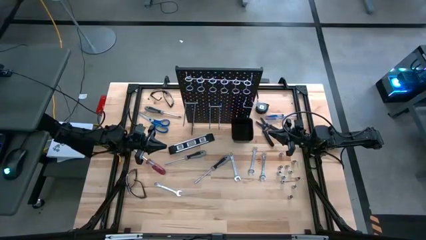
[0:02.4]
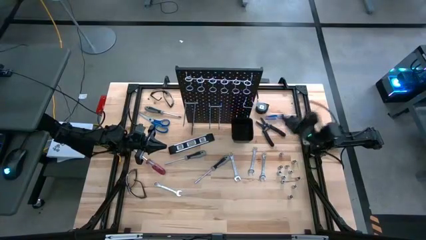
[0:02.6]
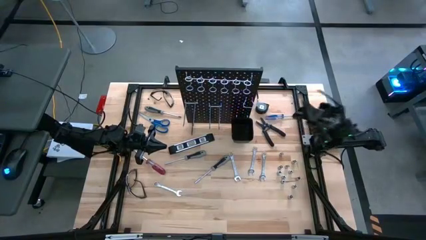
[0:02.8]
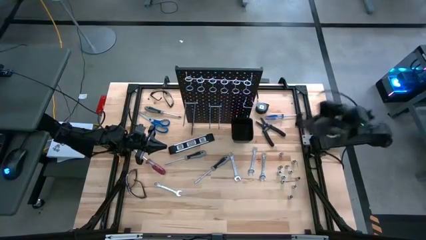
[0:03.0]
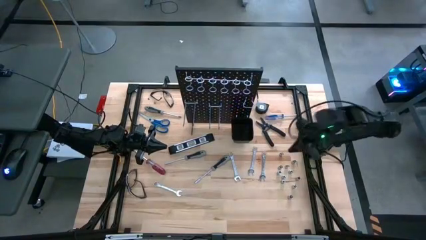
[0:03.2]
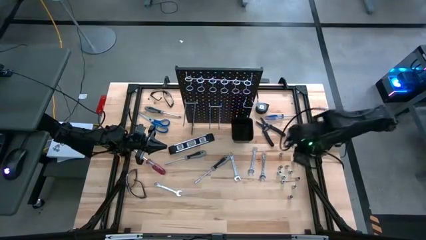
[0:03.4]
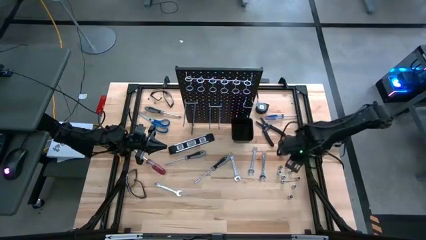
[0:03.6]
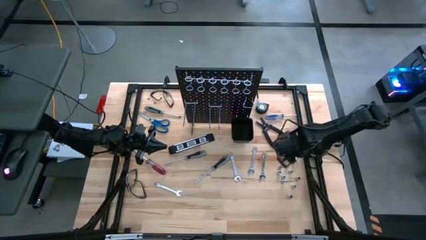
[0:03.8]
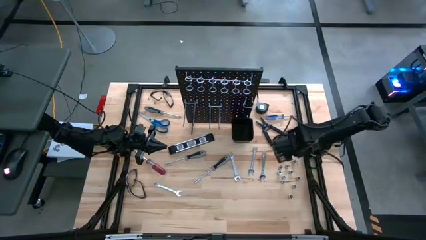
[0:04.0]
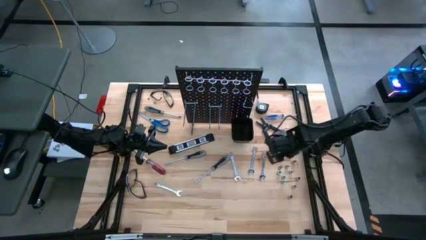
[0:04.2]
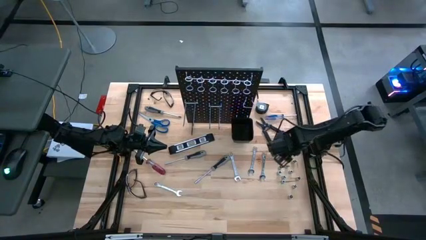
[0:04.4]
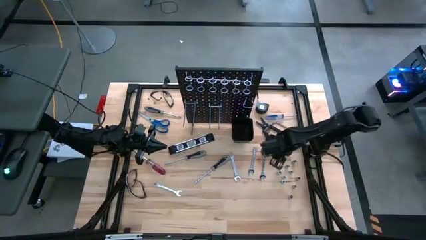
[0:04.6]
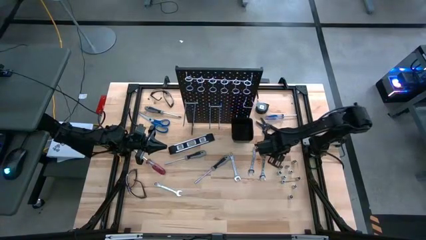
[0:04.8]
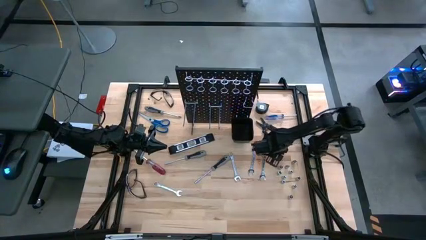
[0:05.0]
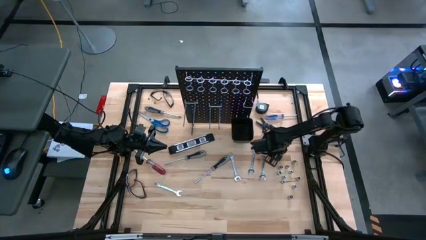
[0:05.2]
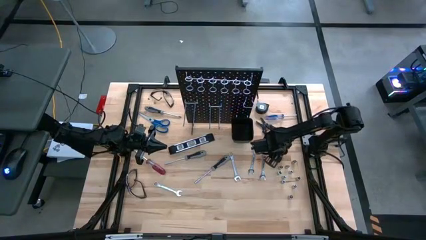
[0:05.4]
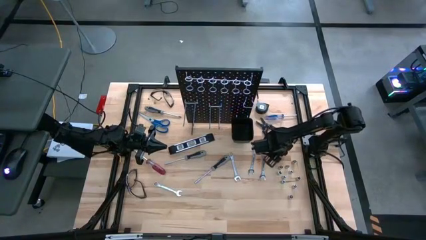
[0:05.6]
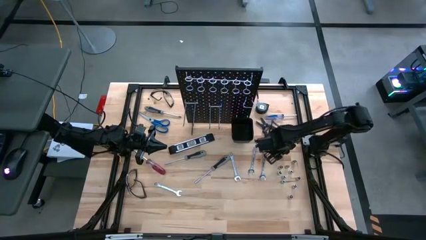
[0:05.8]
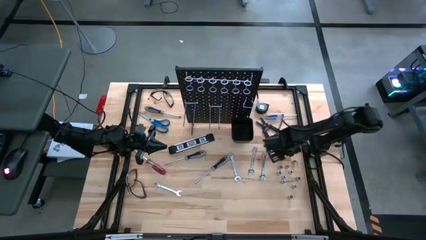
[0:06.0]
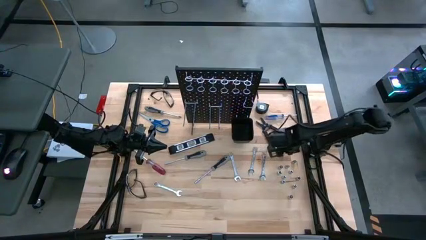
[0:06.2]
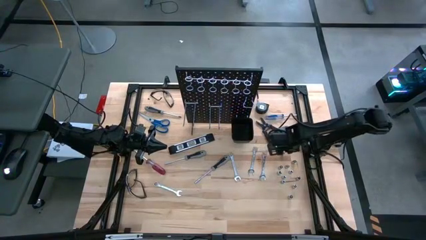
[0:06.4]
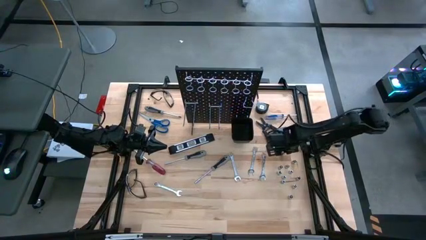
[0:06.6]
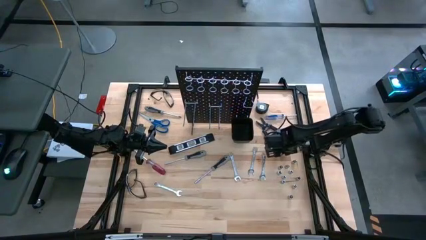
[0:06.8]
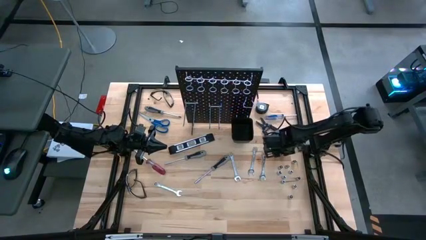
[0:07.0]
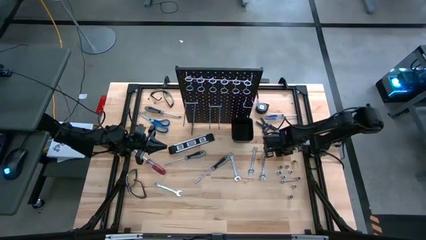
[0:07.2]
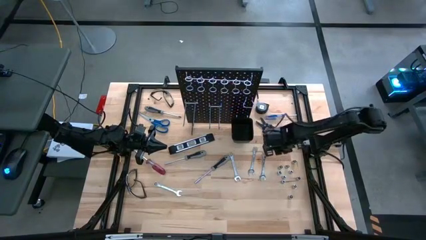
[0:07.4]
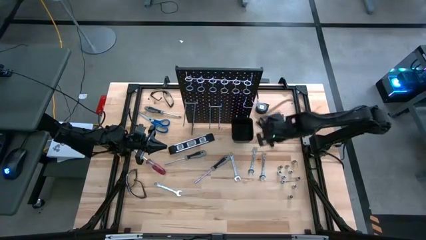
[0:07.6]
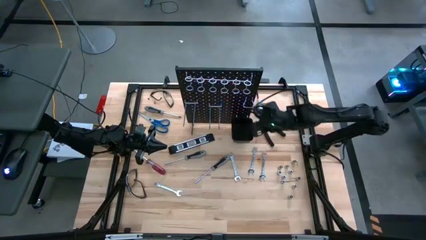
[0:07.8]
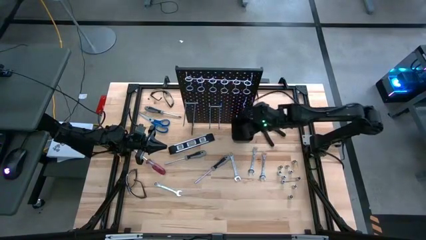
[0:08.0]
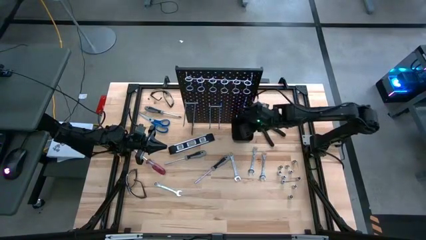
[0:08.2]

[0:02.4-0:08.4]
Task: Hang tools onto peg board
Put the silver socket in the black bin on the pegboard

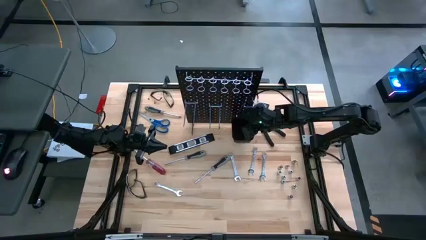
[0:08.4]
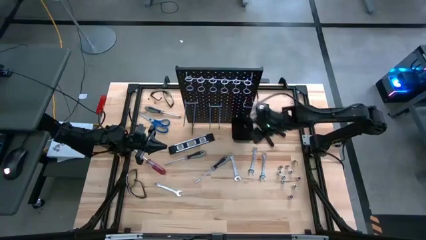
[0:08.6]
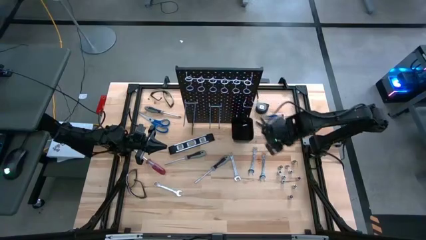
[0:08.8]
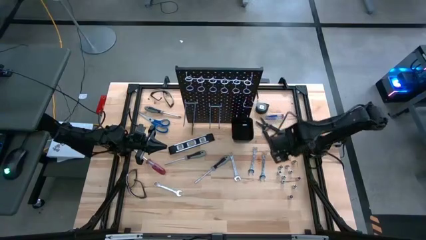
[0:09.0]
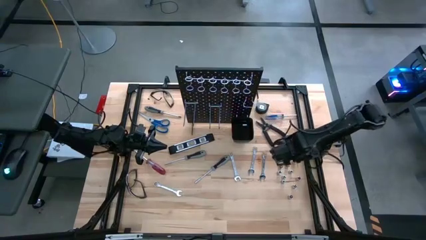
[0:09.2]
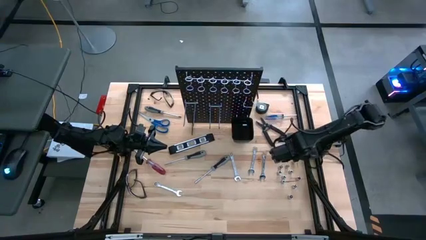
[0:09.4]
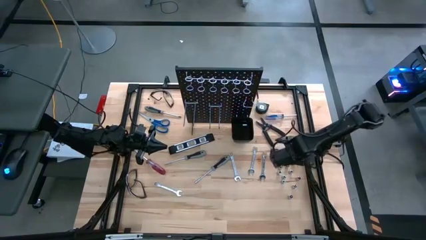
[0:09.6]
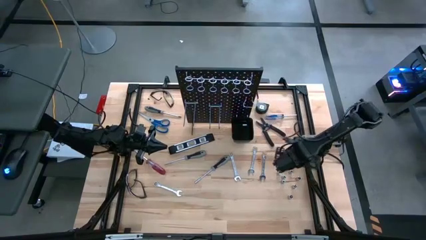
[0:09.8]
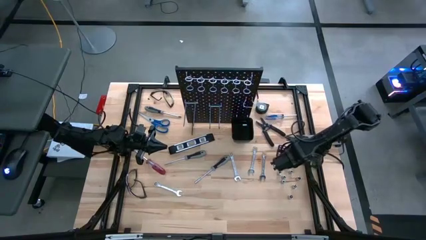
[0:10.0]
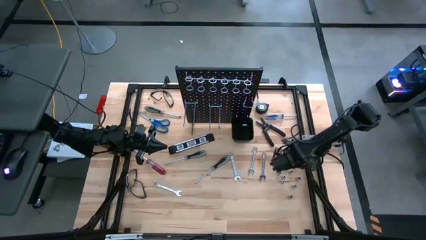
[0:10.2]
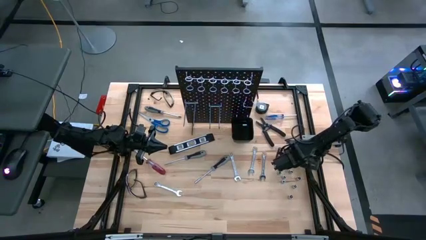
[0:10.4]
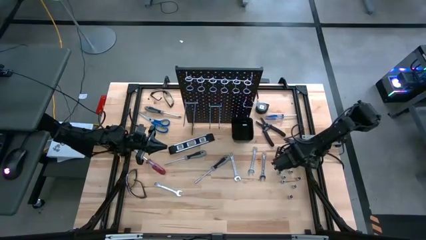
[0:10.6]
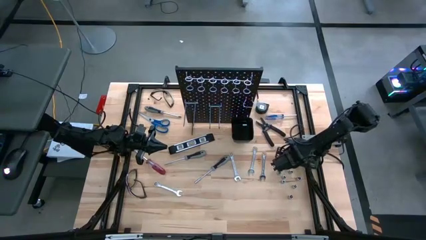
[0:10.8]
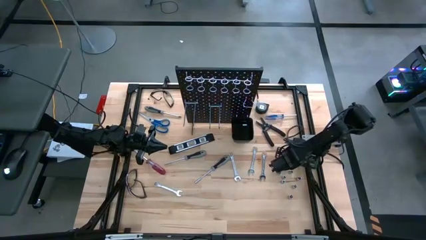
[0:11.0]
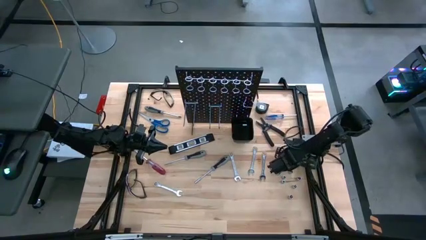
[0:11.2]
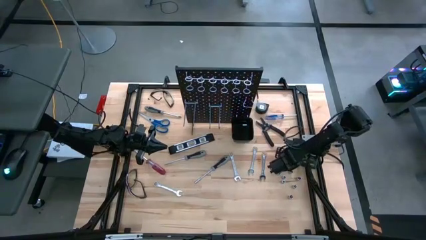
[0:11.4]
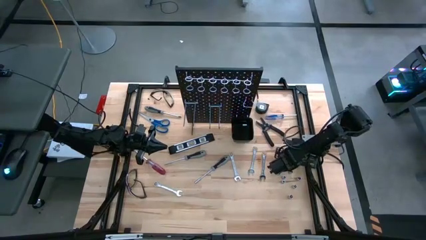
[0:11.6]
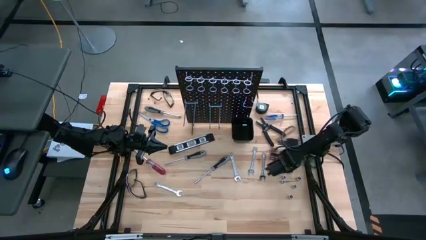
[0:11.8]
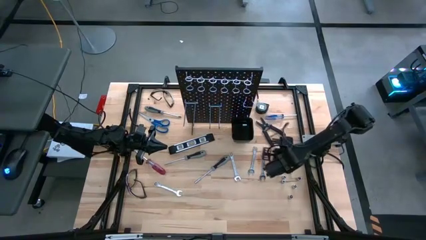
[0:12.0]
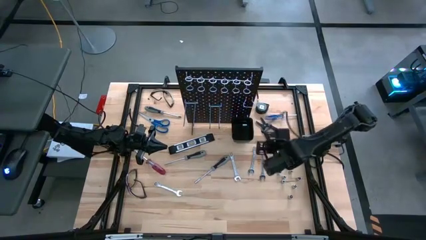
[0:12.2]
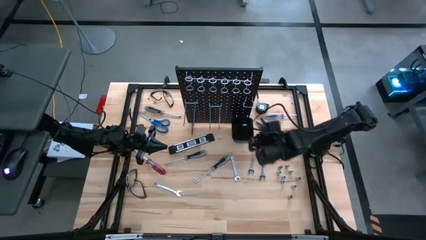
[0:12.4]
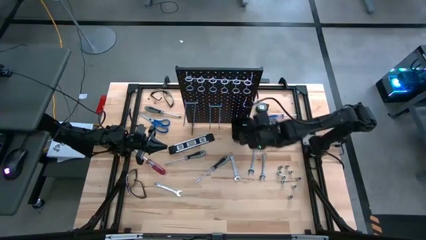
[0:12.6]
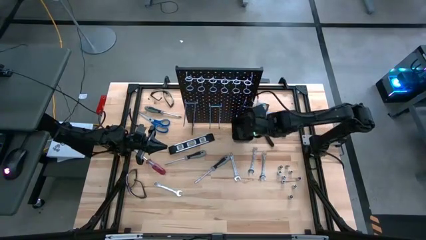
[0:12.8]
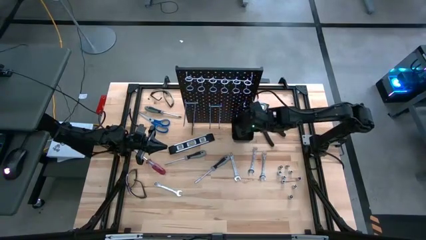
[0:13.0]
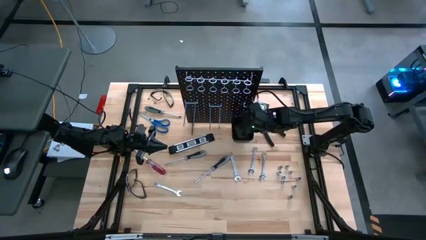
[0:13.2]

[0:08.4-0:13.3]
Put the silver socket in the black bin on the pegboard

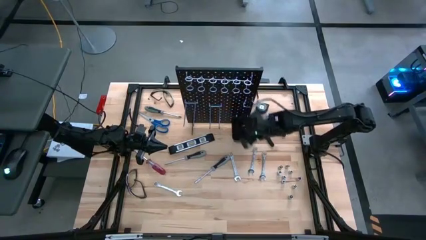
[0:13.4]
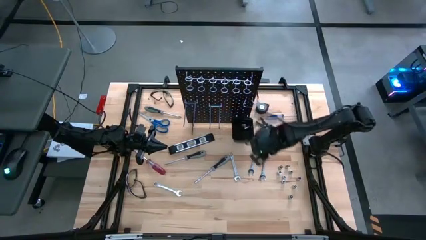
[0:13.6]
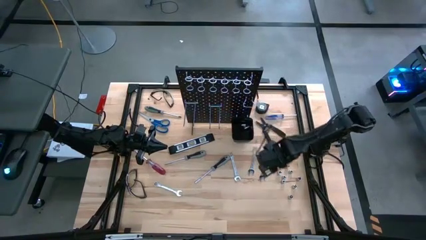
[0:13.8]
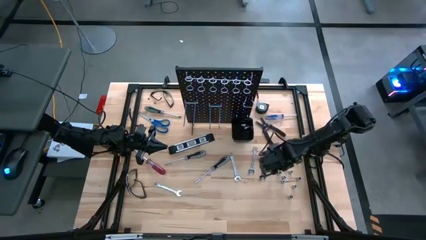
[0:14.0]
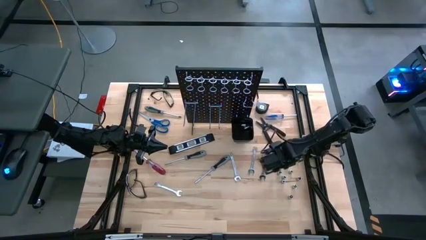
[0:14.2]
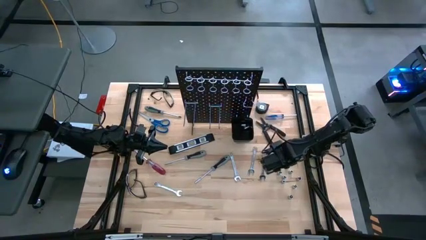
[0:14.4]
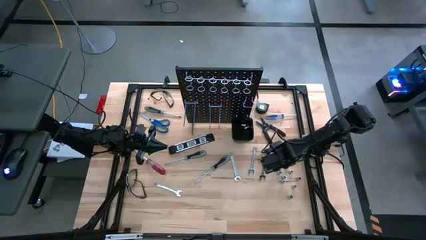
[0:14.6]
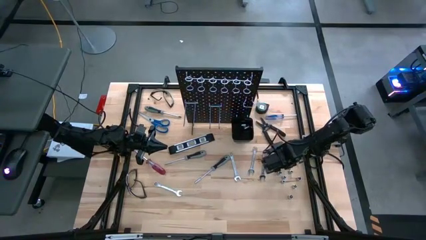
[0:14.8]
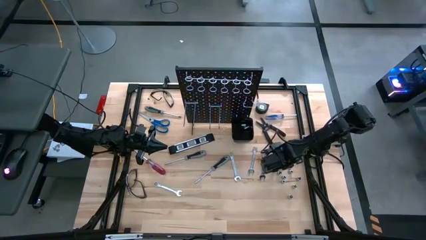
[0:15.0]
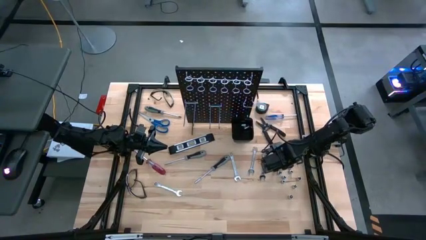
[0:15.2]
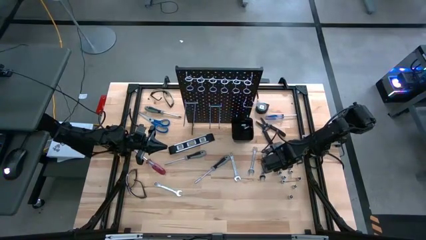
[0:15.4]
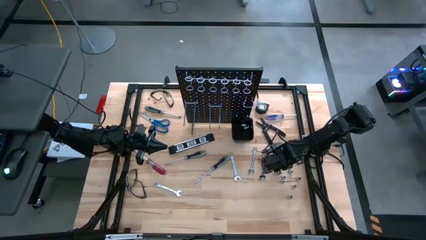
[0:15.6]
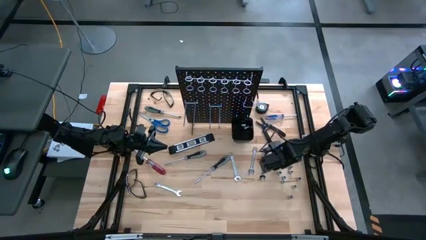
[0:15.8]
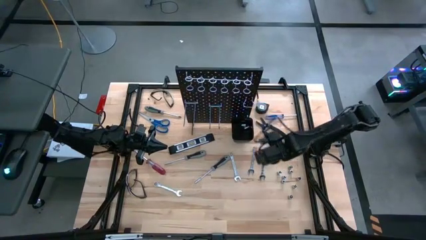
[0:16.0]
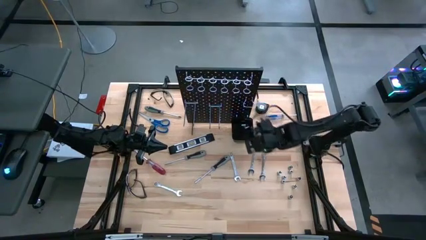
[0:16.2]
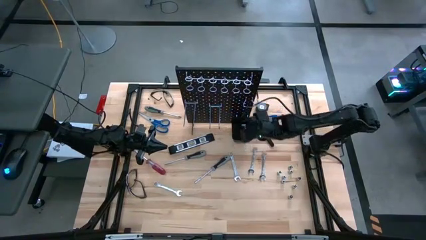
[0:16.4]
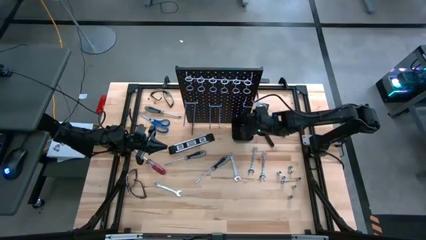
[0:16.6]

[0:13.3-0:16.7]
Put the silver socket in the black bin on the pegboard

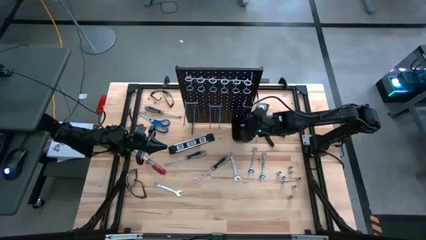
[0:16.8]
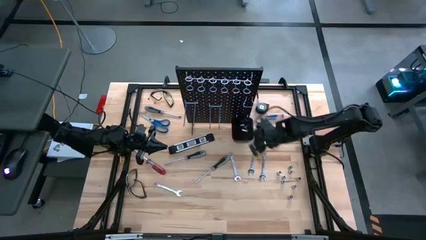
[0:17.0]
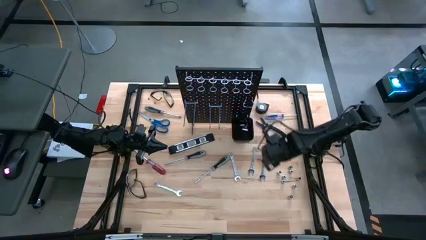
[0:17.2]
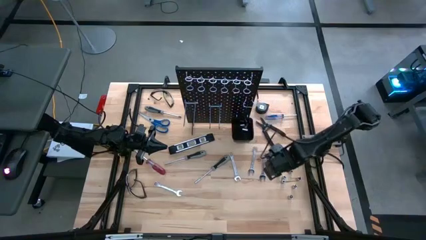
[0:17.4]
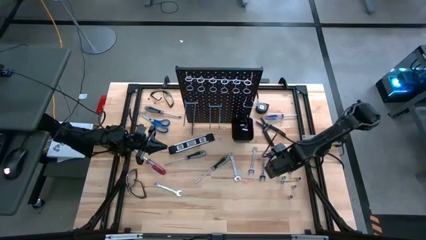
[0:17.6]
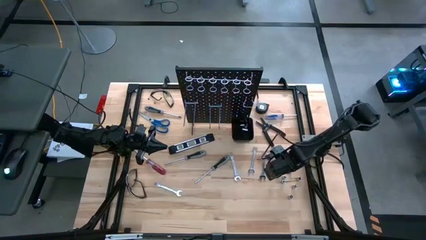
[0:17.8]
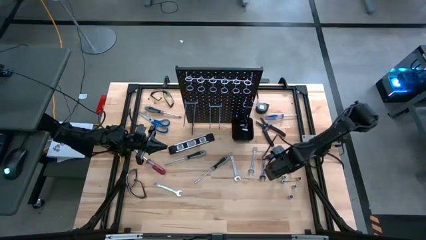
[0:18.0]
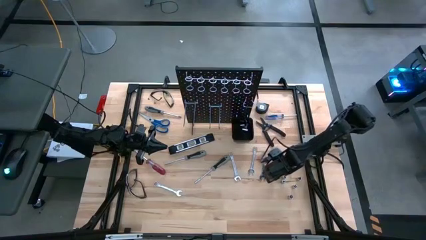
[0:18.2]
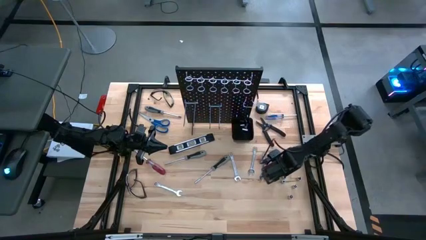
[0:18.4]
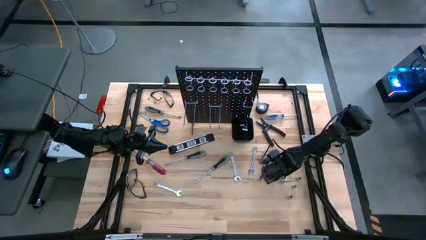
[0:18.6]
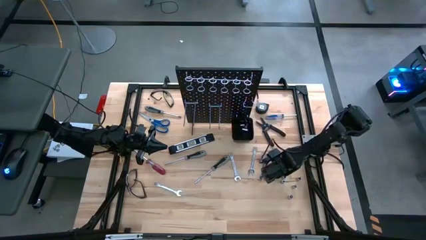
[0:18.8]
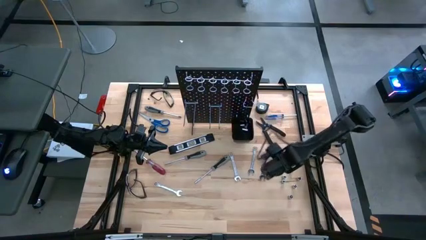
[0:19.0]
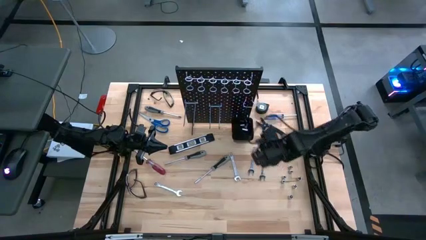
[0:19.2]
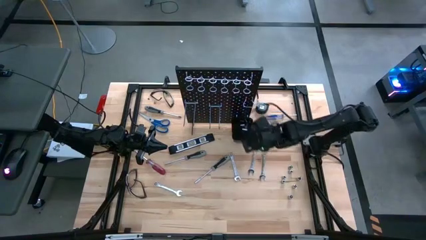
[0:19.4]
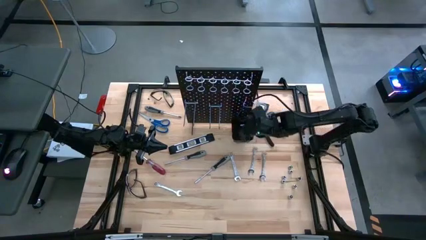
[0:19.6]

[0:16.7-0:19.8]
Put the silver socket in the black bin on the pegboard
